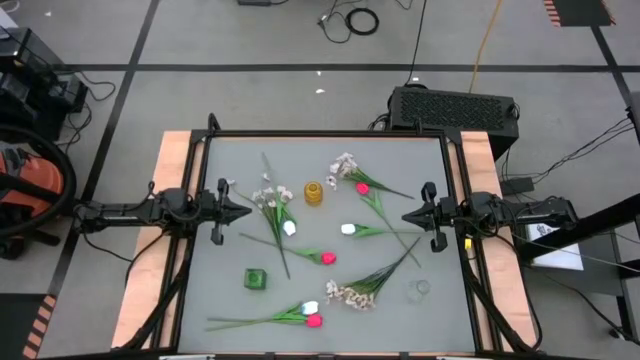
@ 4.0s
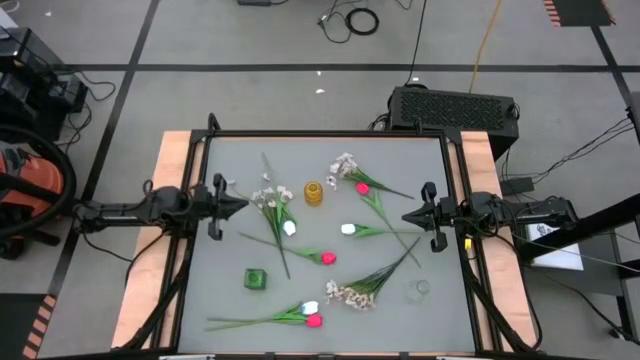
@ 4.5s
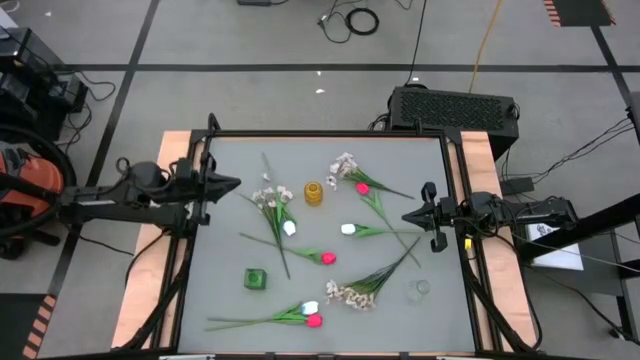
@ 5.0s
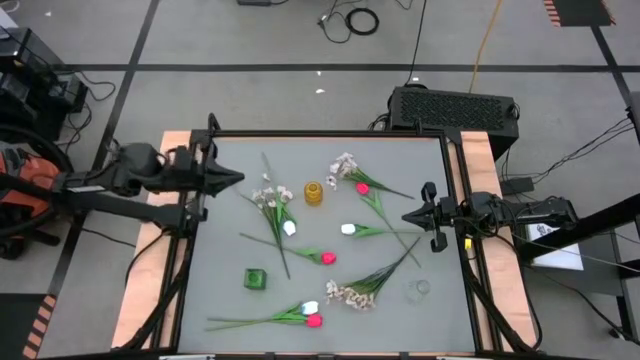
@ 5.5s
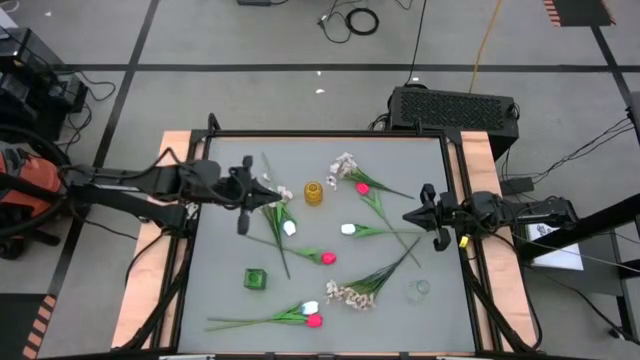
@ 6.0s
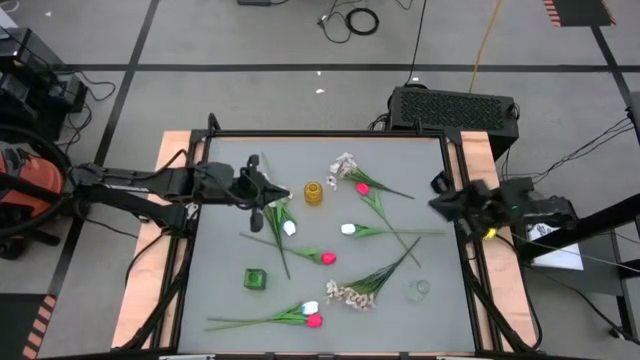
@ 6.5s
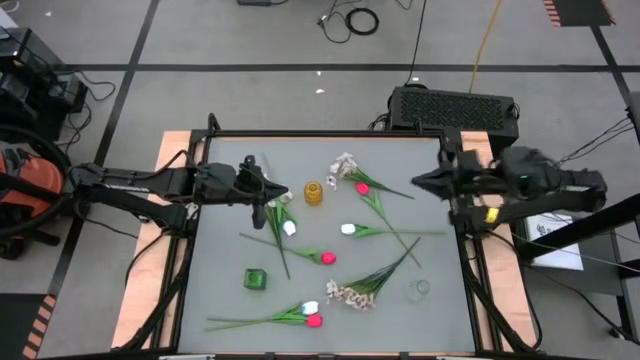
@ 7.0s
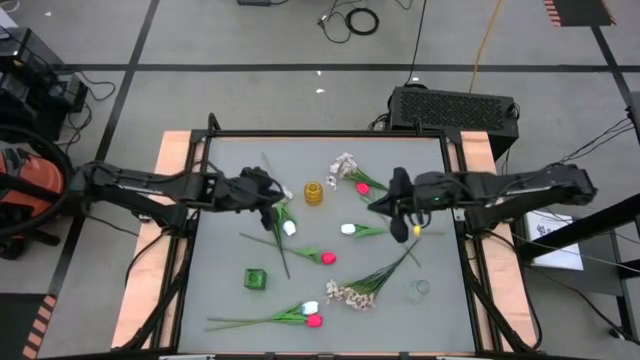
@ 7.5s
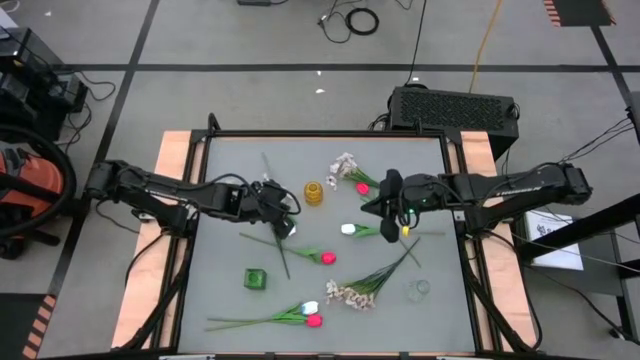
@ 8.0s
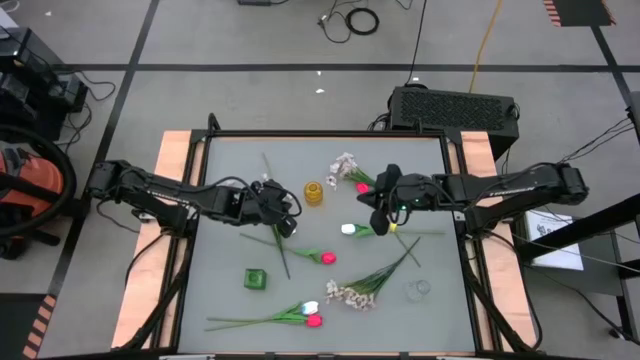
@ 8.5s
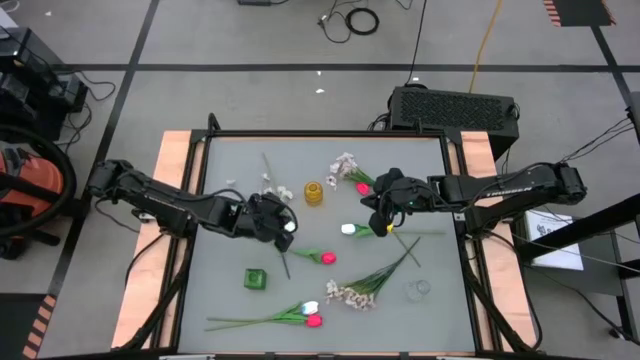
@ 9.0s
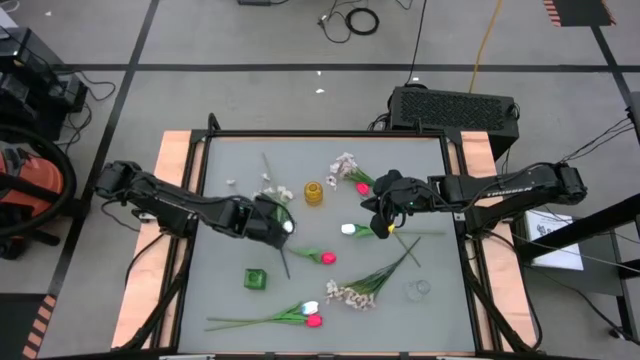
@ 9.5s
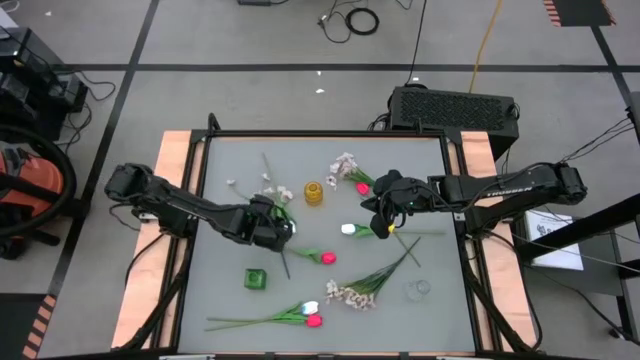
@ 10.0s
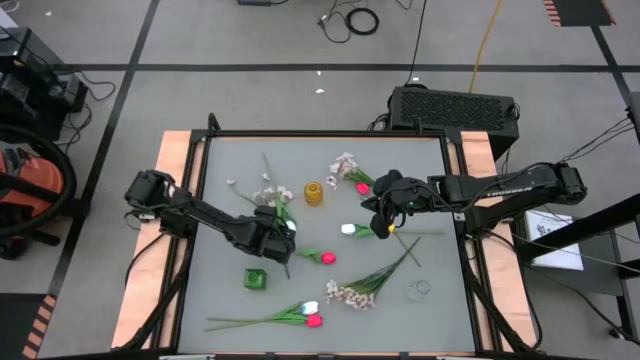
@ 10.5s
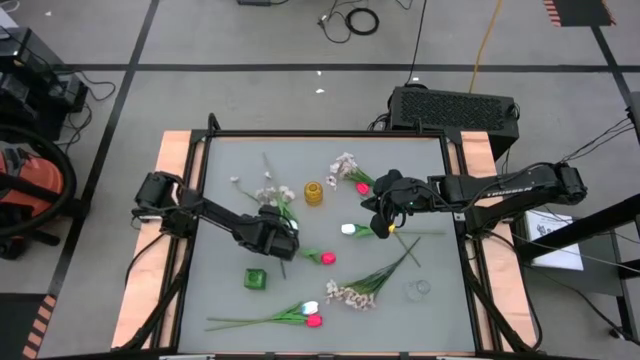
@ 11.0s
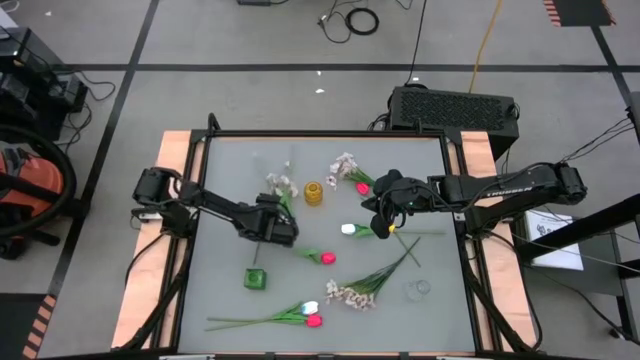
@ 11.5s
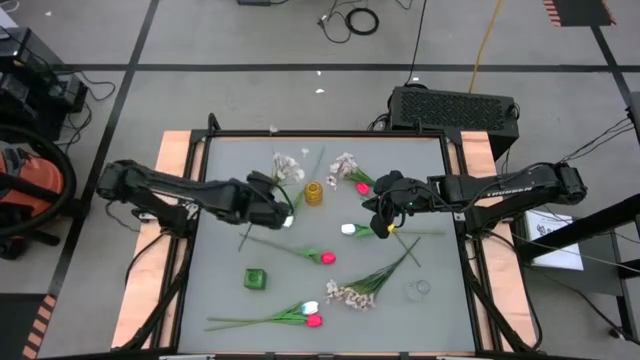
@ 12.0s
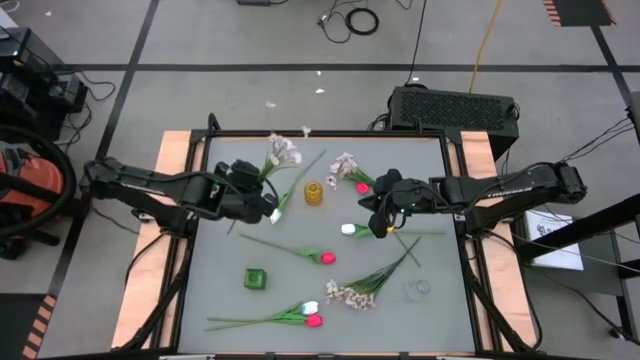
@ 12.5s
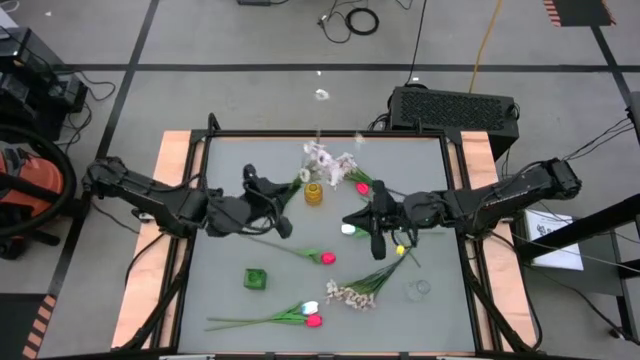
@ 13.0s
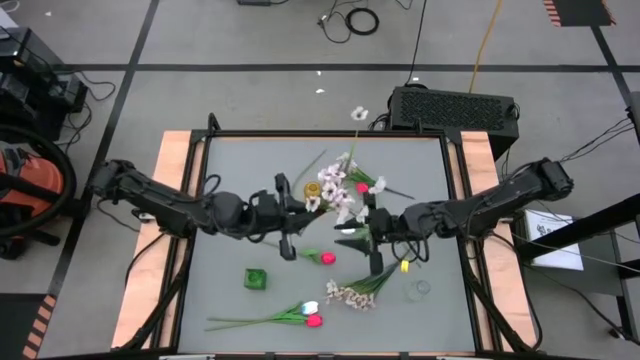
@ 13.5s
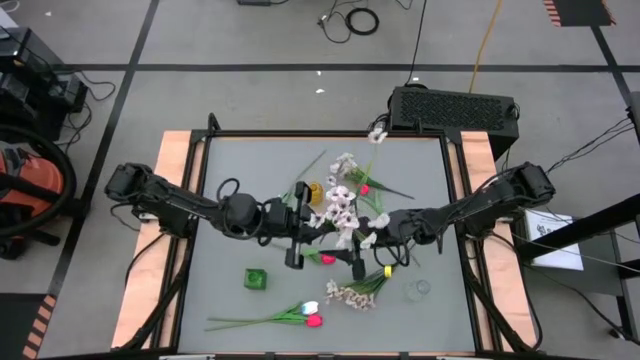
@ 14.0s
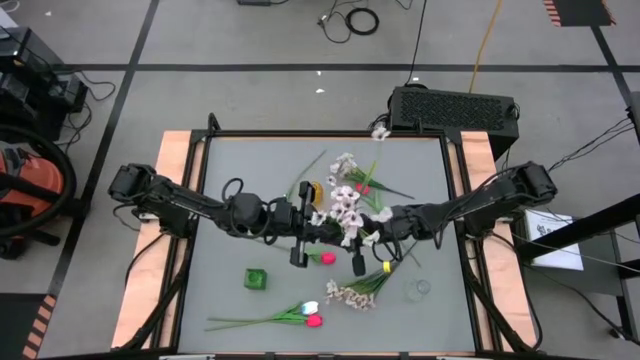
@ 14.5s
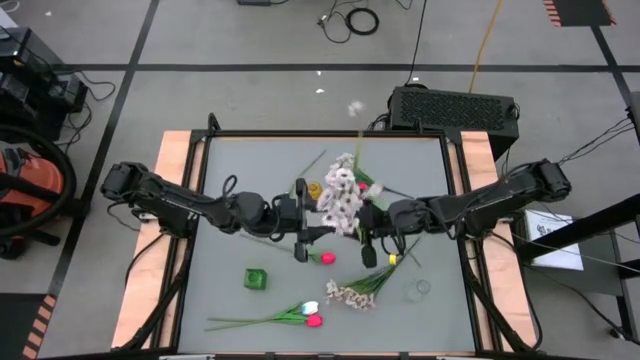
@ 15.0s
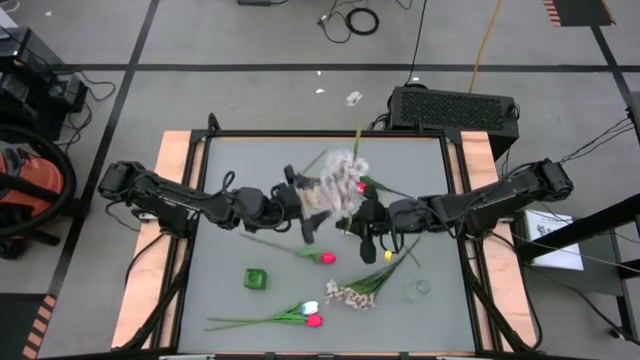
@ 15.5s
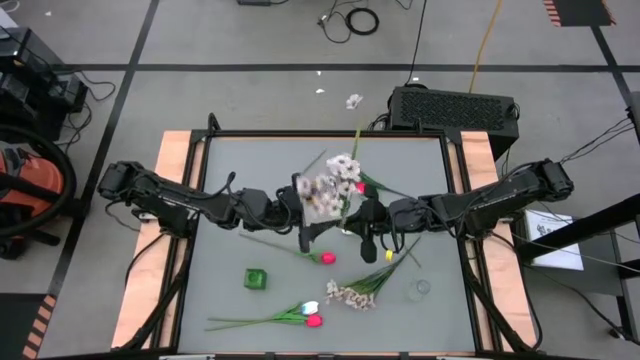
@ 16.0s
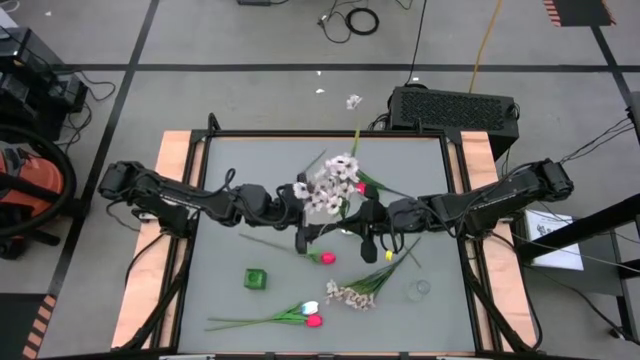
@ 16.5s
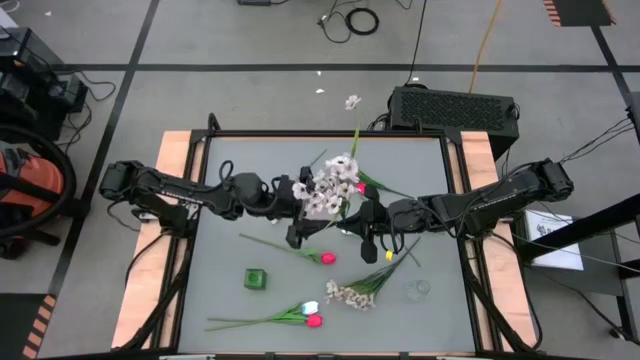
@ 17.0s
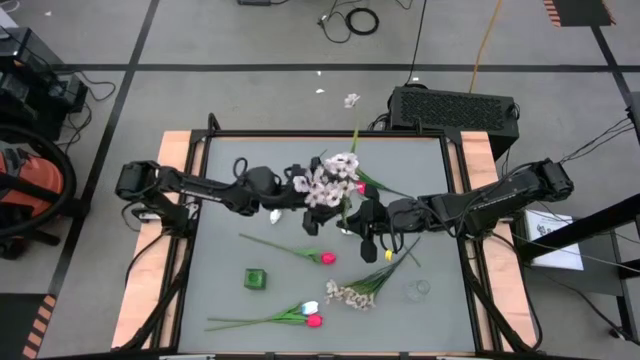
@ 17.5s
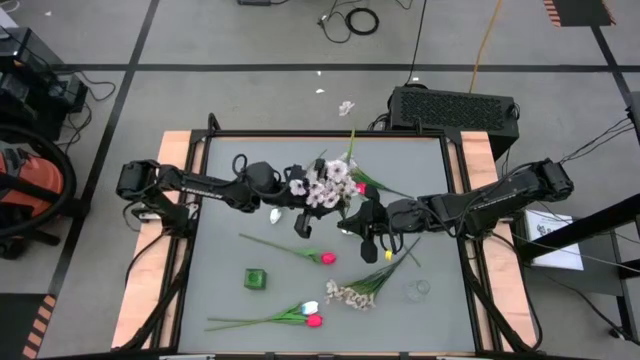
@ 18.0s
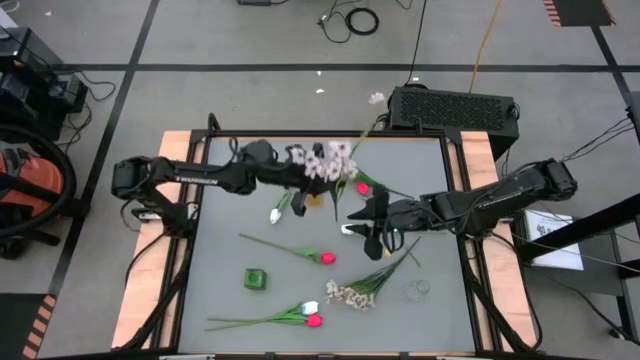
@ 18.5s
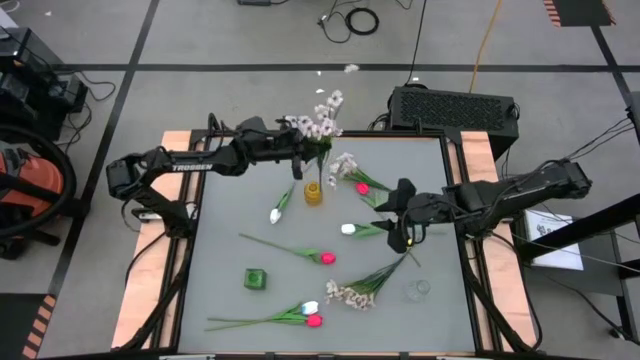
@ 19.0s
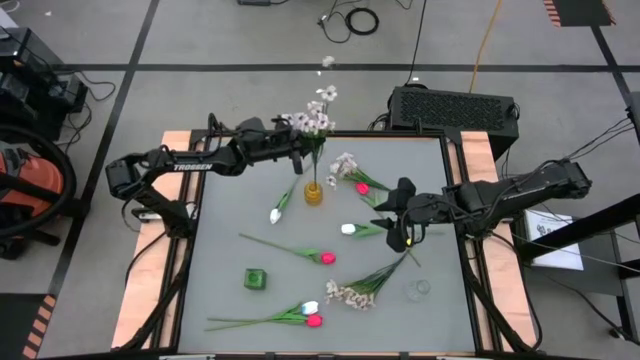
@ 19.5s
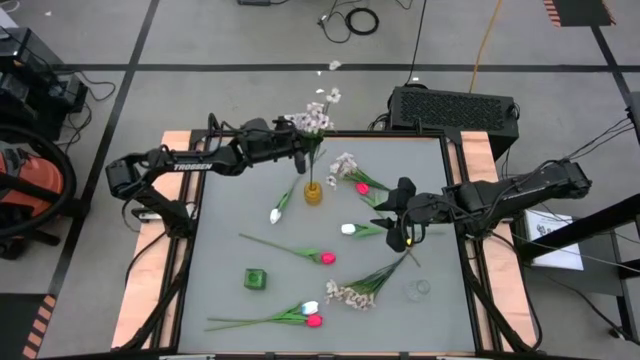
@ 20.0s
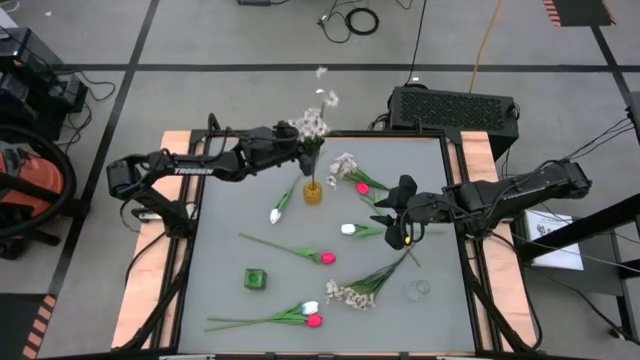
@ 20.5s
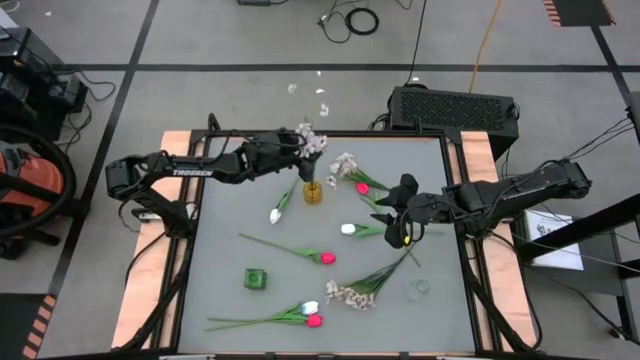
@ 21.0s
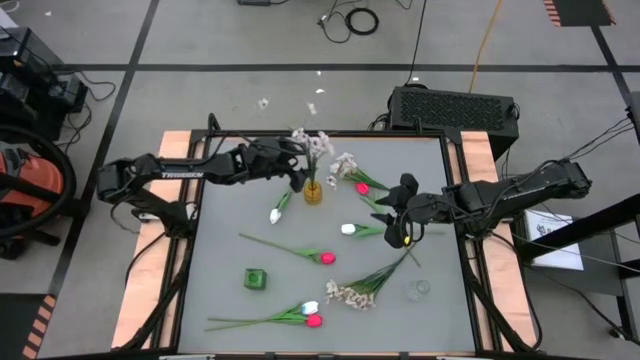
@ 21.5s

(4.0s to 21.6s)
Task: Sort flowers into vase by color
Put the middle left white flowers into the yellow vase

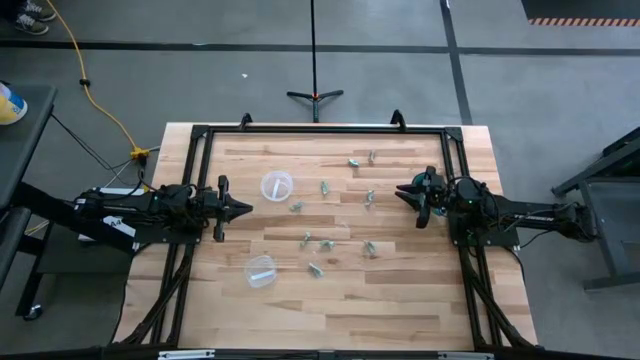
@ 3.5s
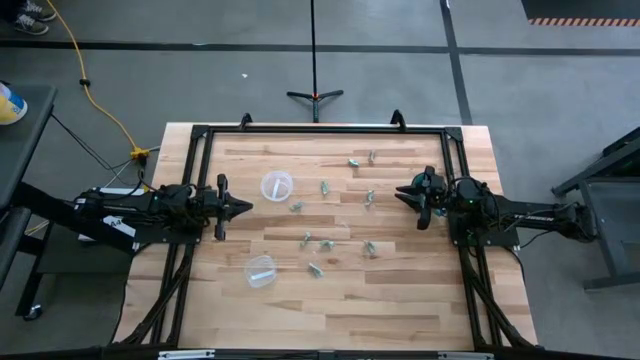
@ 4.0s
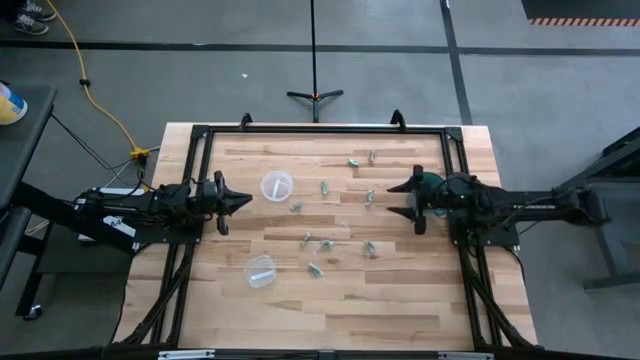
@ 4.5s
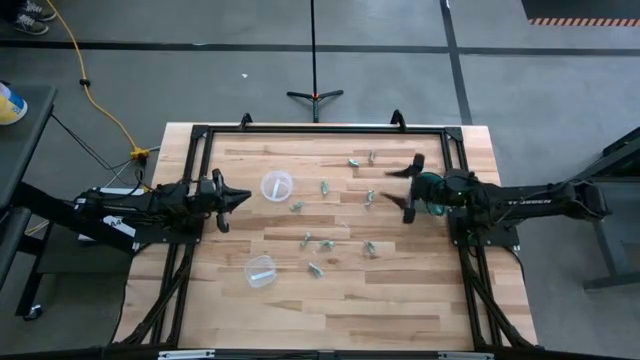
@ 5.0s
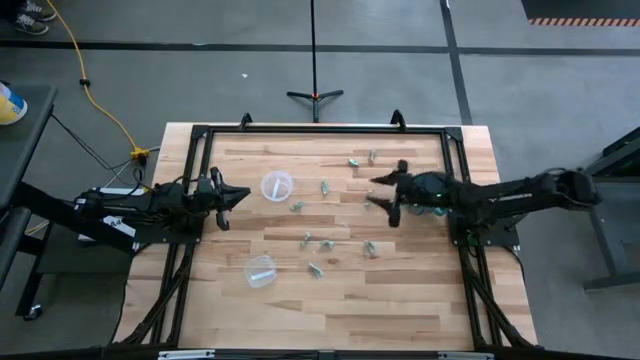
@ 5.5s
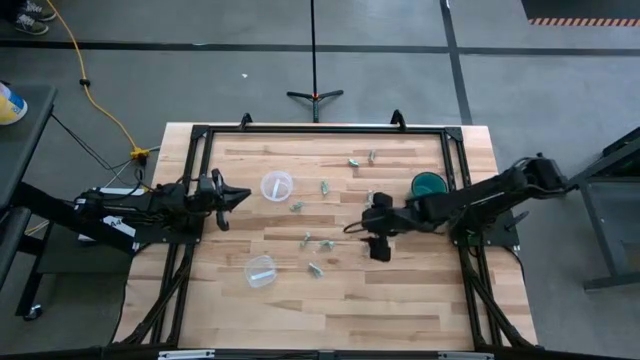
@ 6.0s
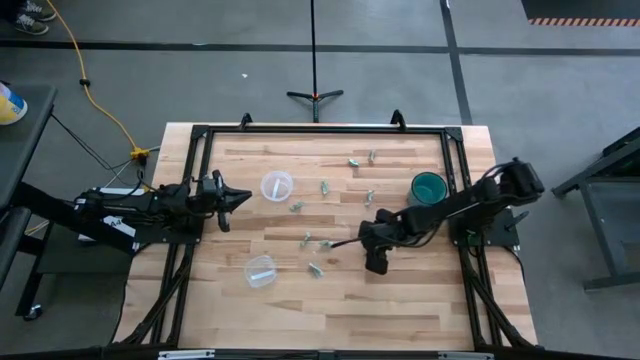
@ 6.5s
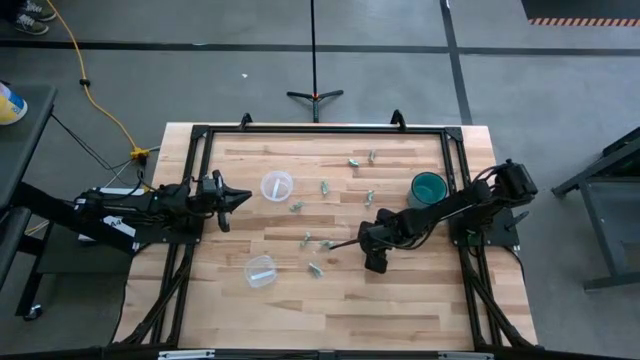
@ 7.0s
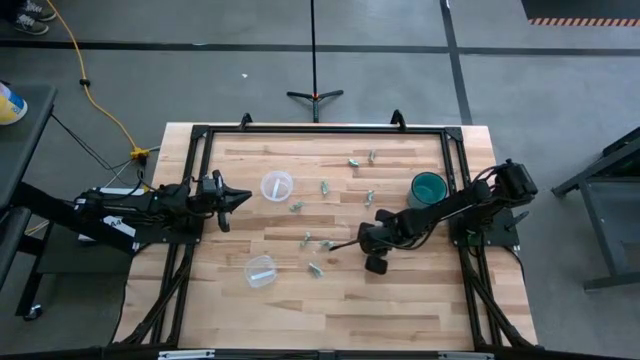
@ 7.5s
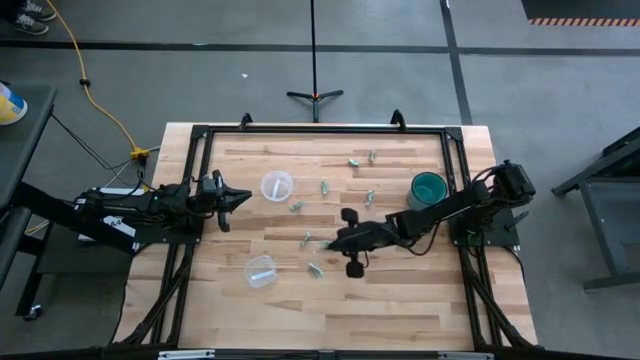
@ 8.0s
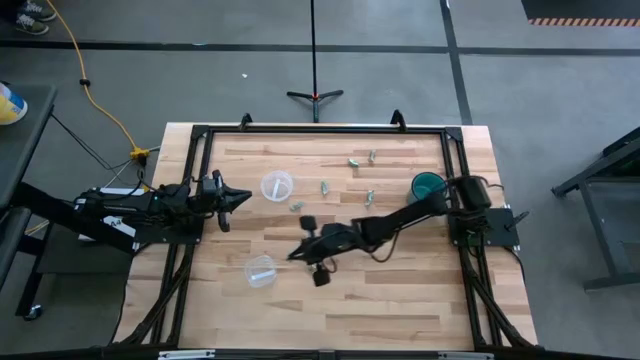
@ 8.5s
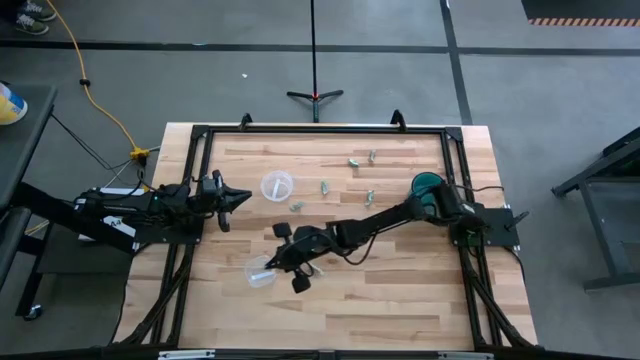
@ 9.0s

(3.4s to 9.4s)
Task: Pick and place items into bin
Put the white stevia packet into the bottom transparent bin
